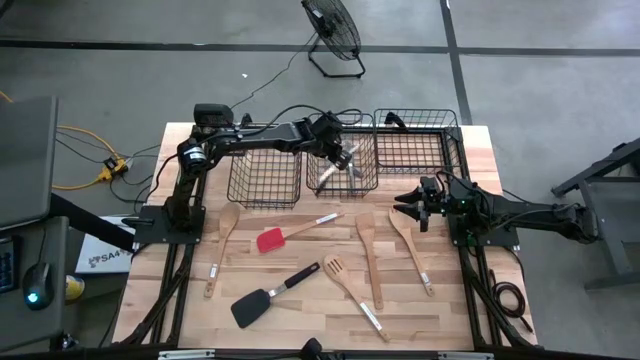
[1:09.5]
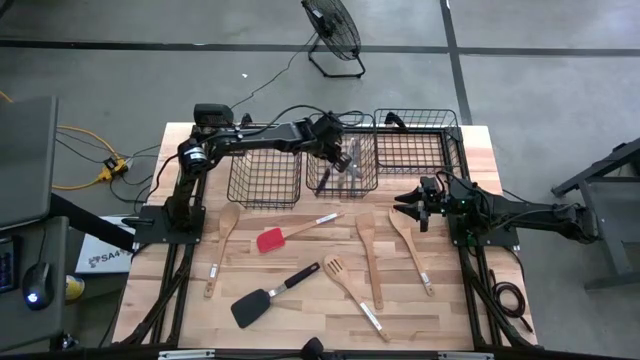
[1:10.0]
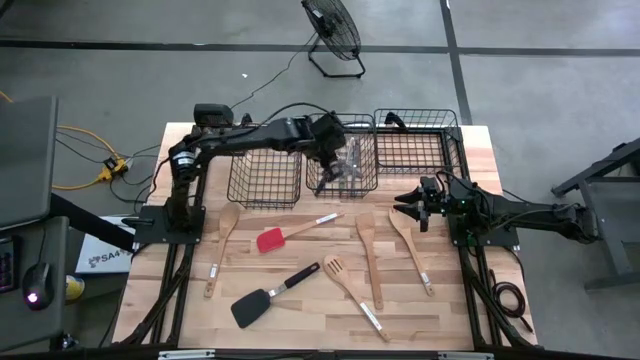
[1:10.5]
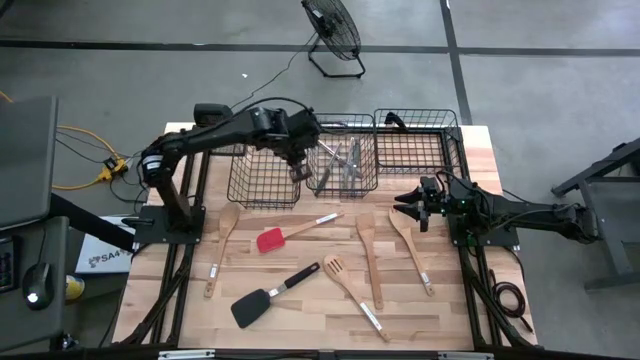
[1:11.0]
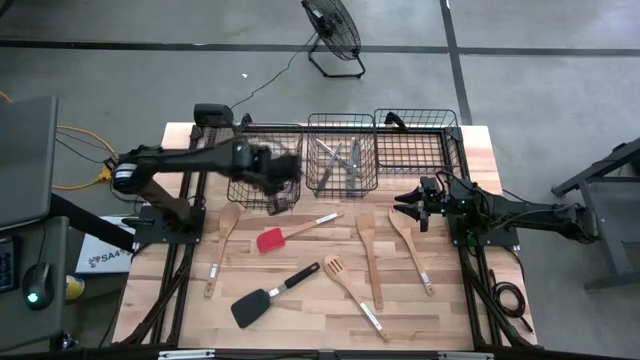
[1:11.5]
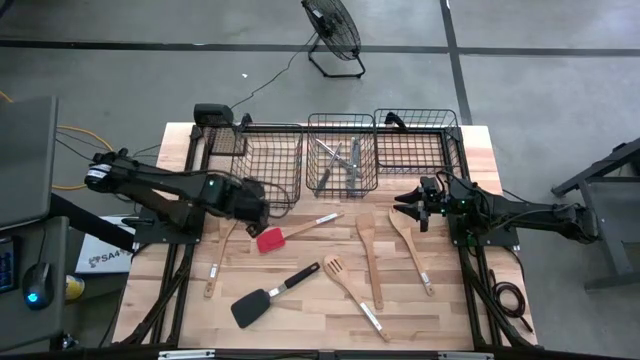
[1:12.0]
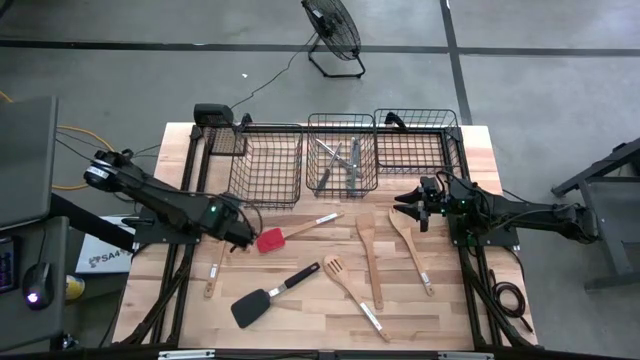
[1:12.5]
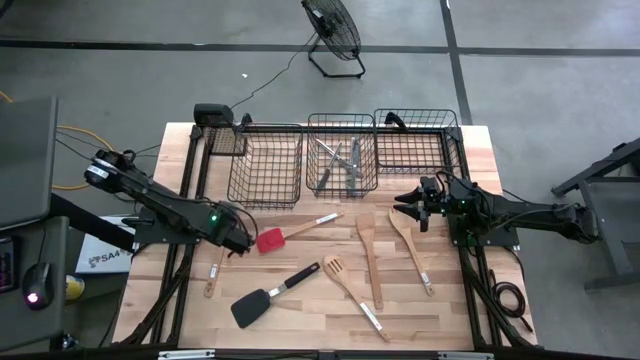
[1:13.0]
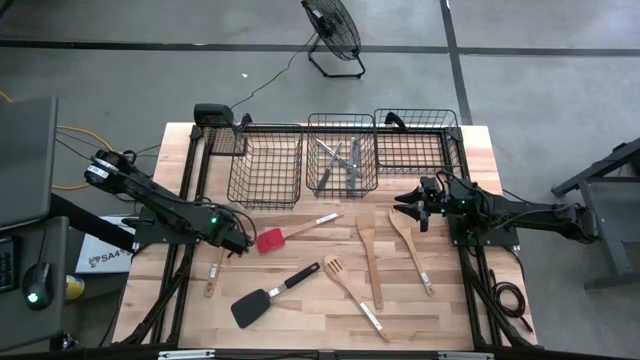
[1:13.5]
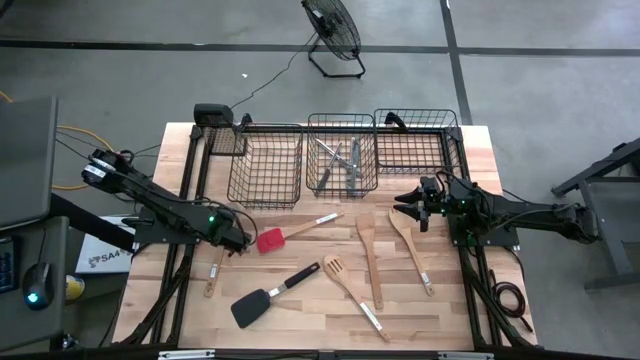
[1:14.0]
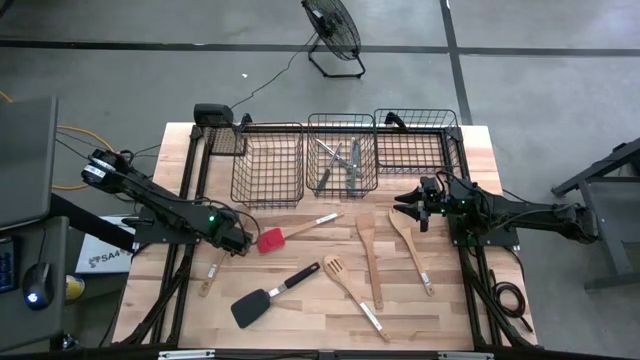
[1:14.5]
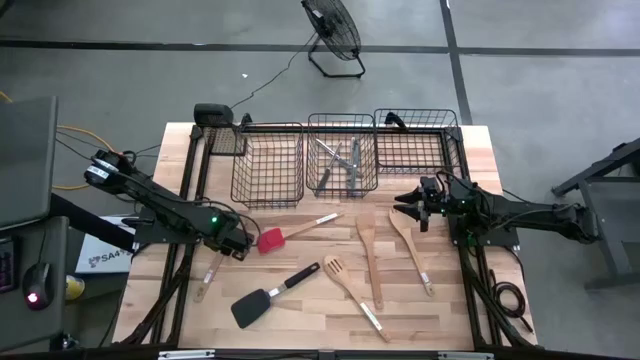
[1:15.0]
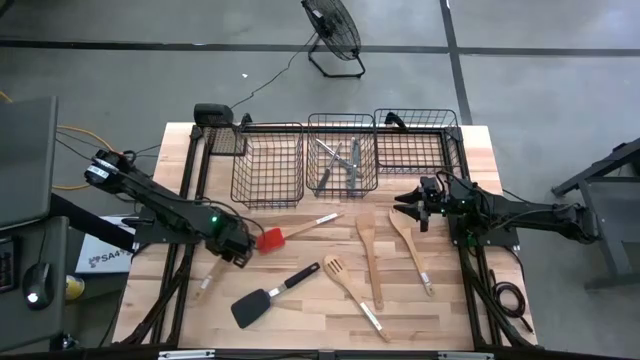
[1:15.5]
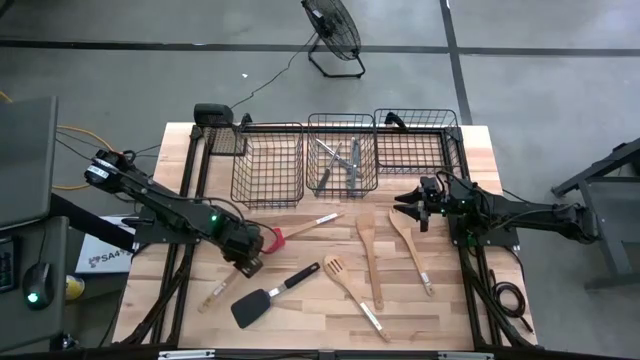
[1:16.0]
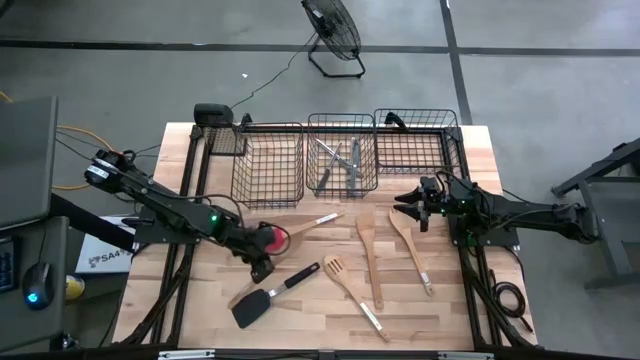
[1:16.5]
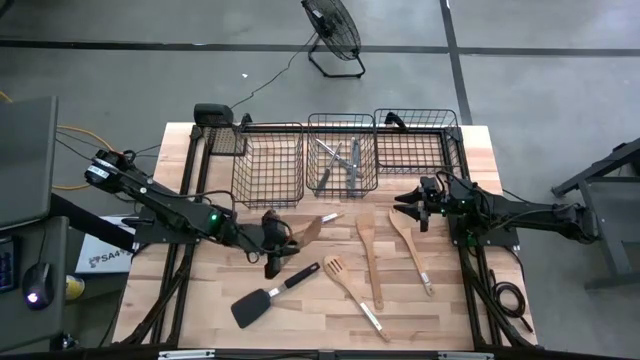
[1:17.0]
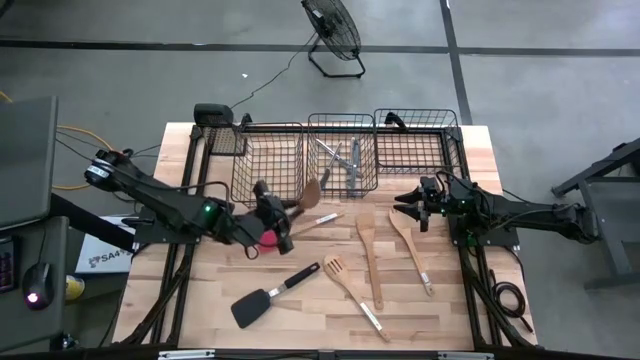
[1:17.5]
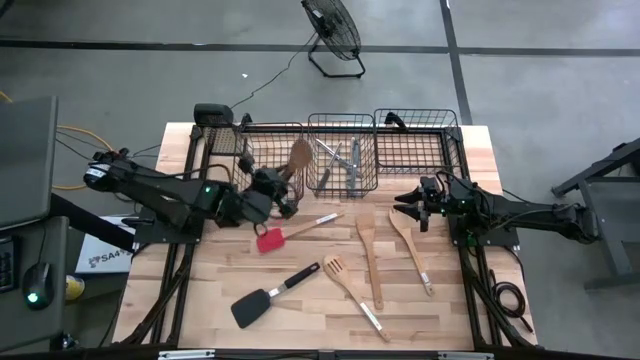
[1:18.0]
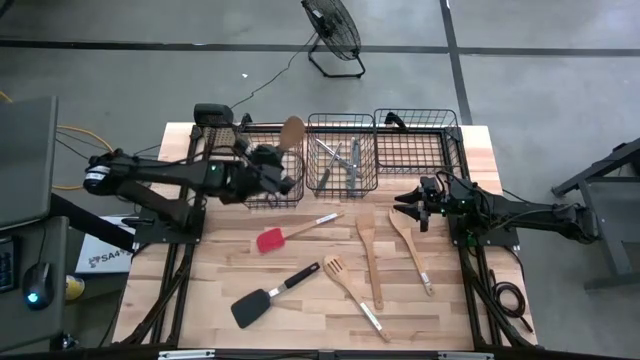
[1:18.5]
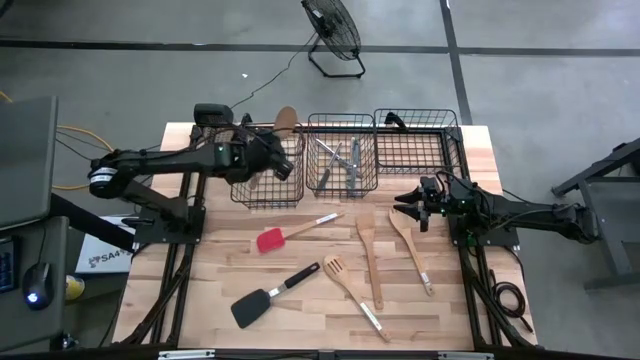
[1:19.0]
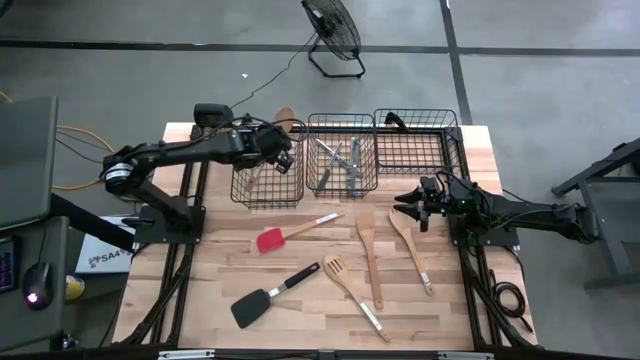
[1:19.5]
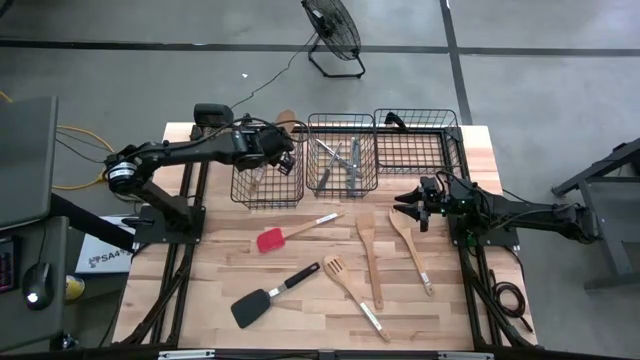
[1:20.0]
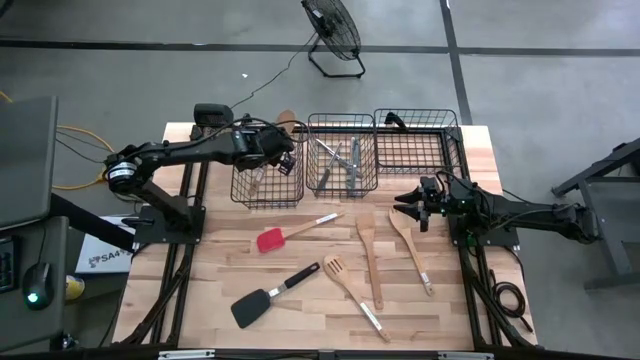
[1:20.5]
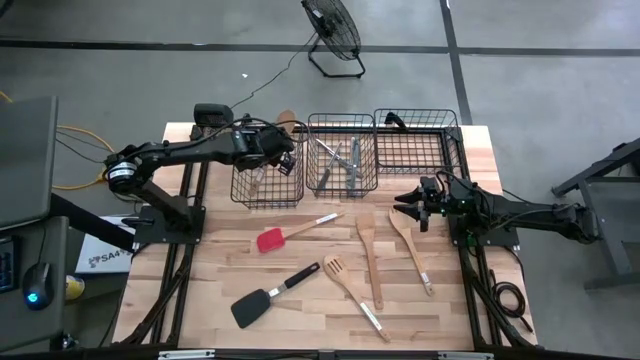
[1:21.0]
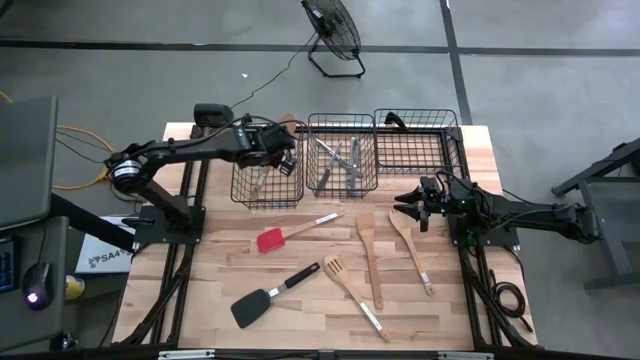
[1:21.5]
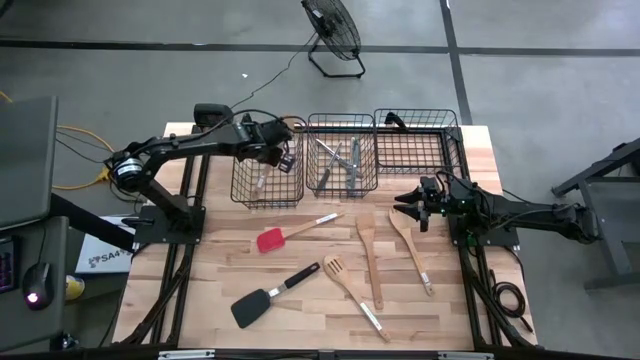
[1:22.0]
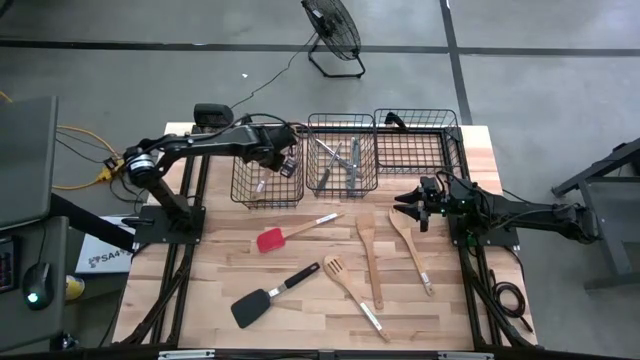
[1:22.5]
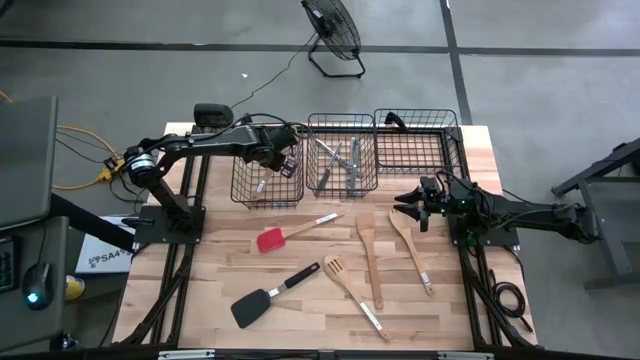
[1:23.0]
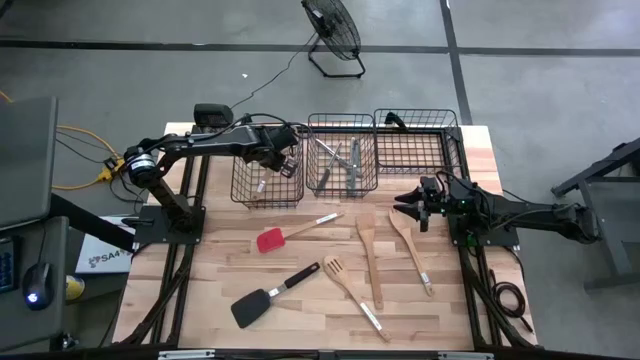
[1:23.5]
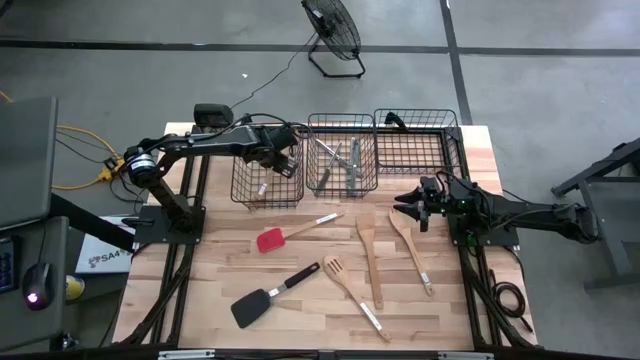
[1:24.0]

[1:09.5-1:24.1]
Task: Pick & Place Kitchen Items
Put the wooden serving spoon into the left wire basket
